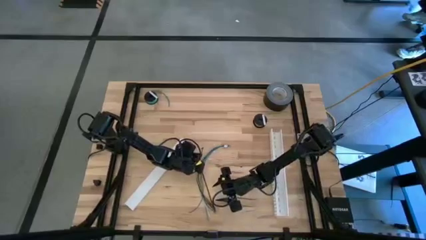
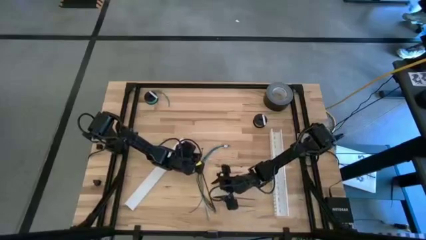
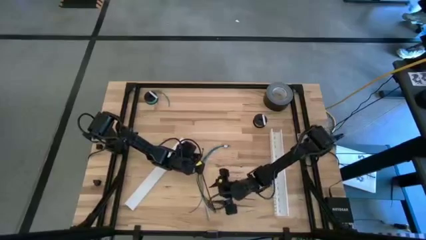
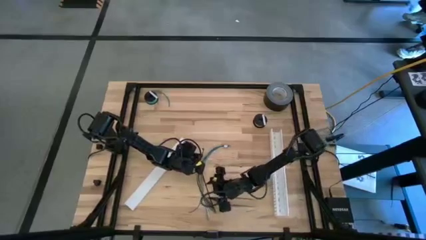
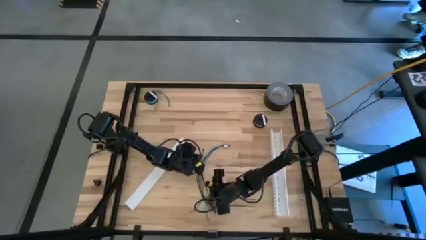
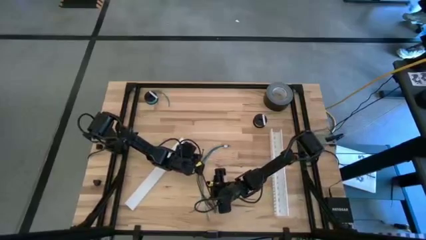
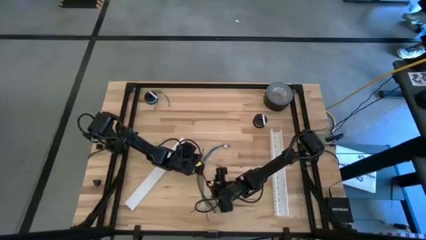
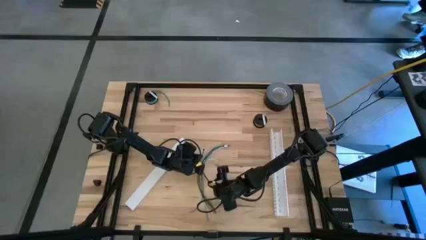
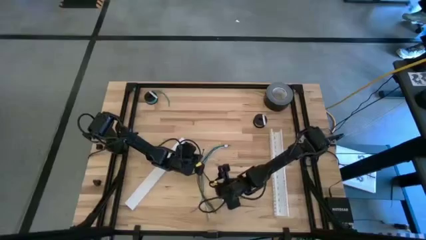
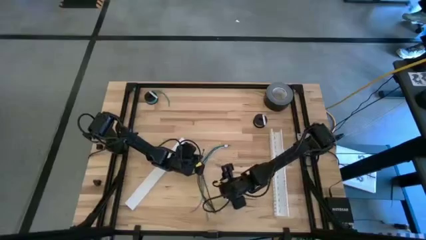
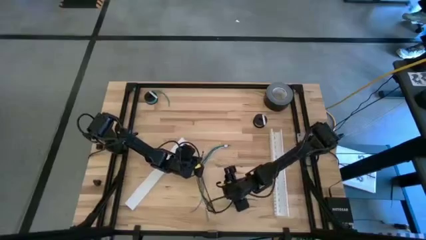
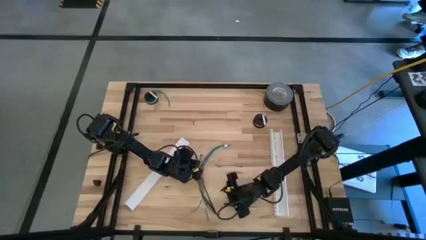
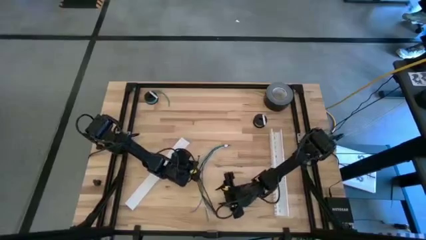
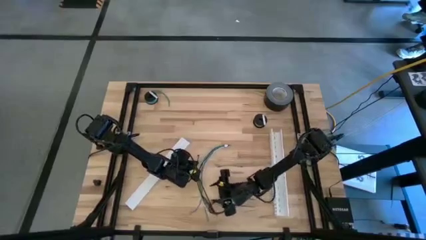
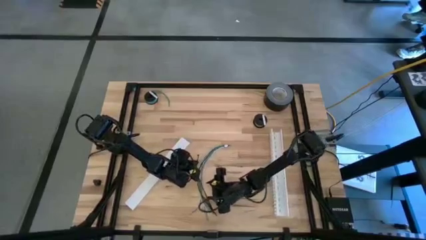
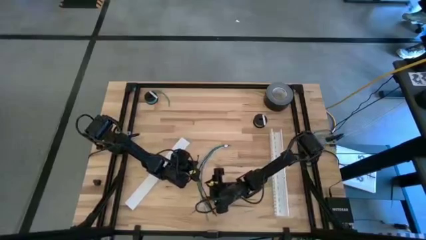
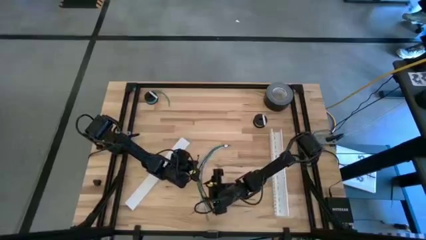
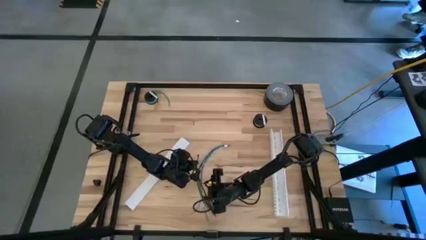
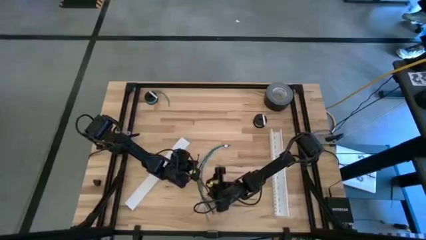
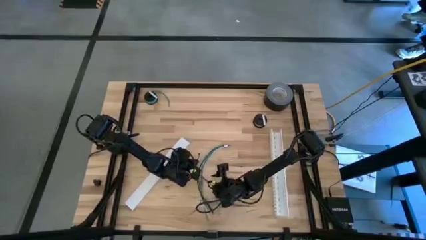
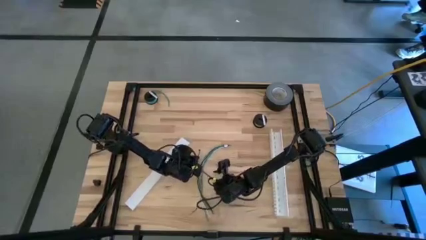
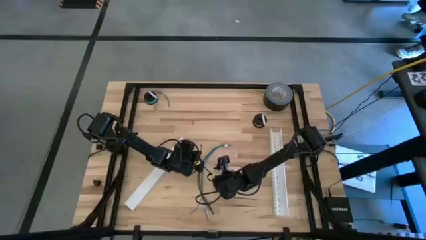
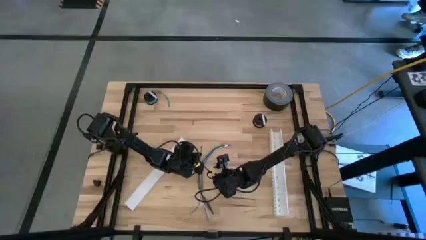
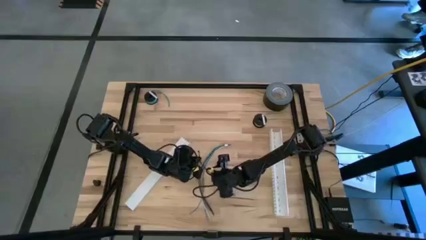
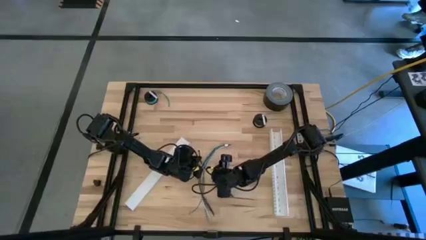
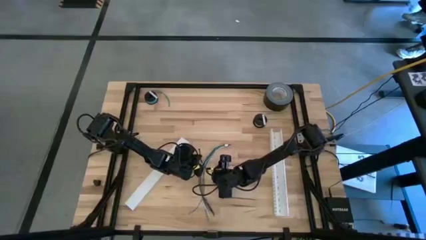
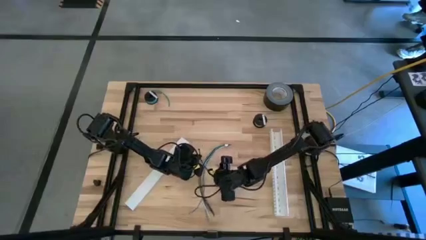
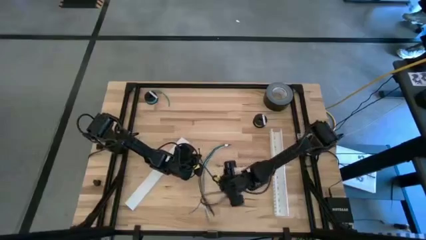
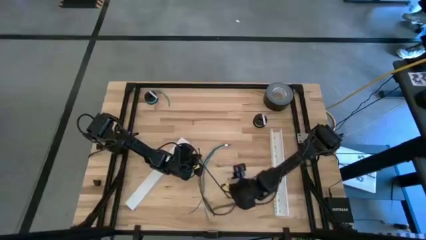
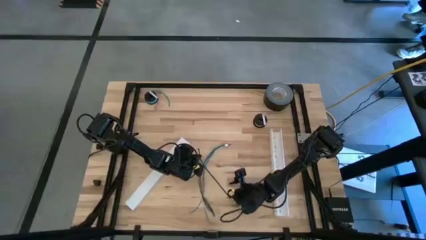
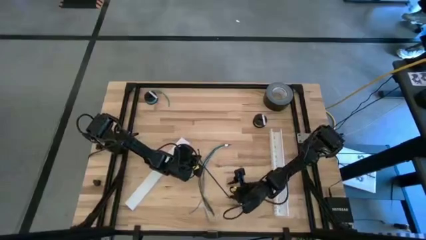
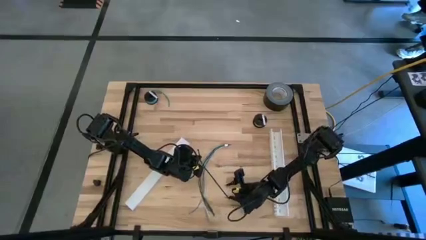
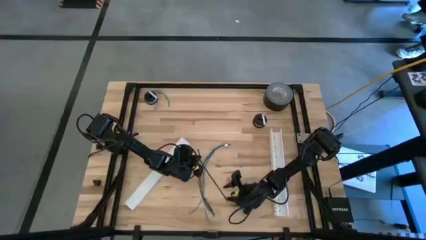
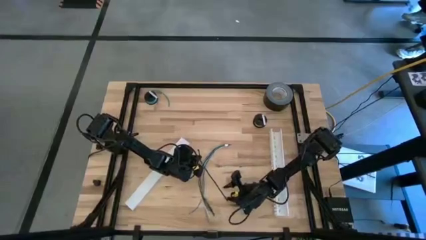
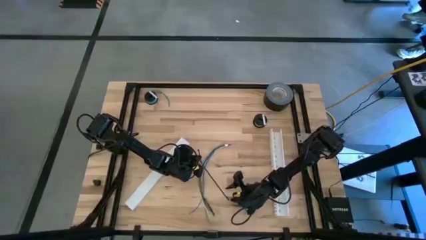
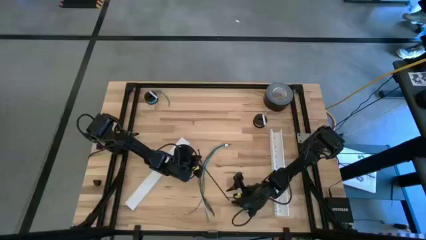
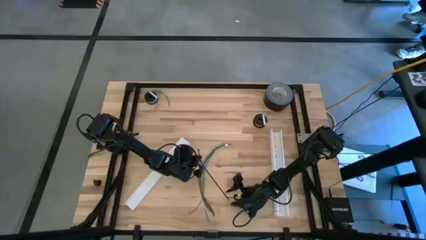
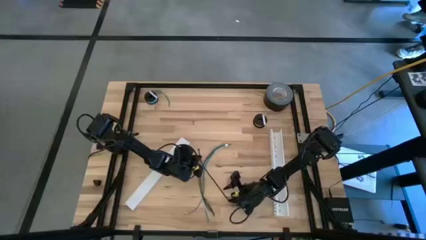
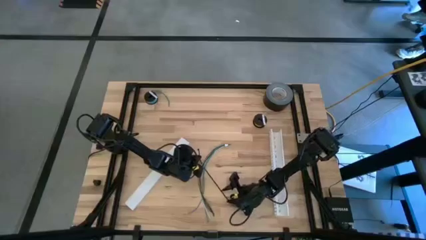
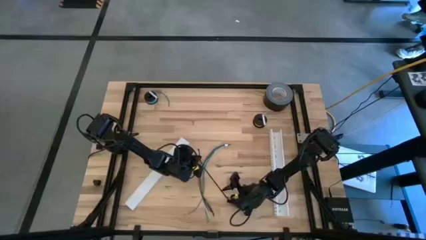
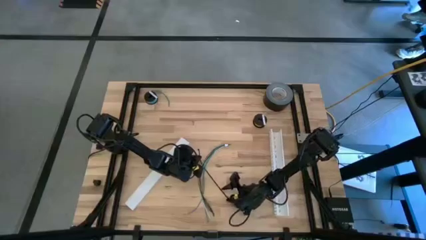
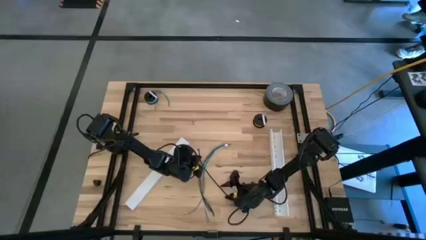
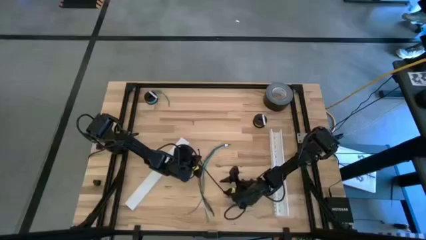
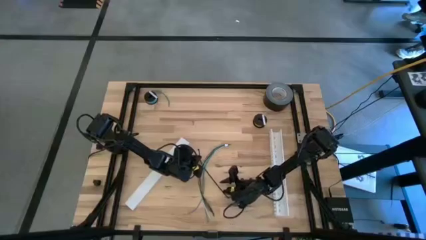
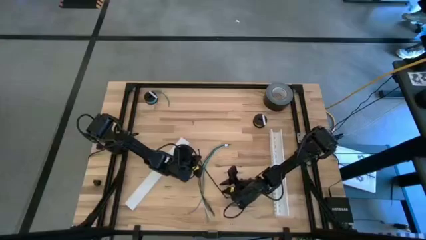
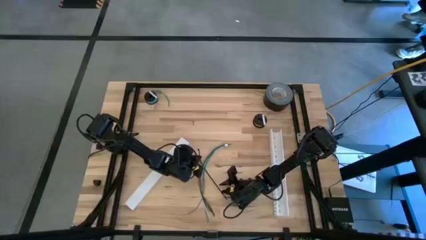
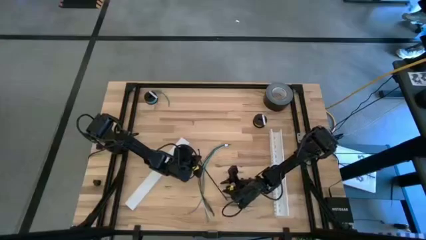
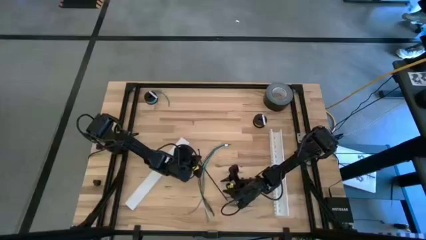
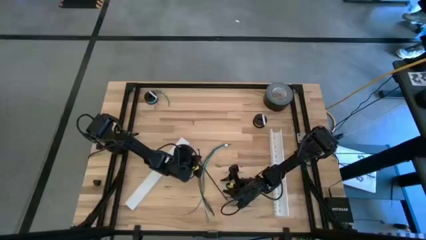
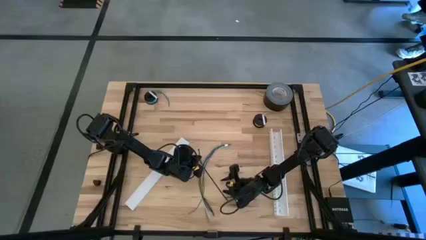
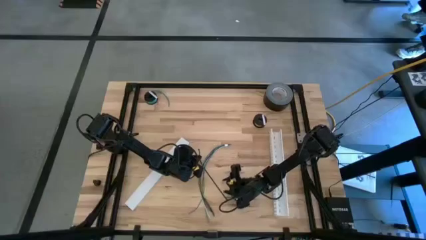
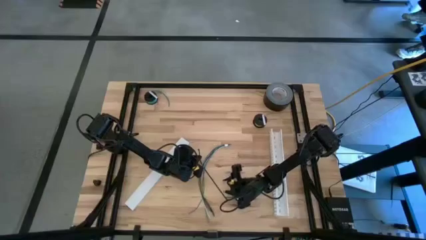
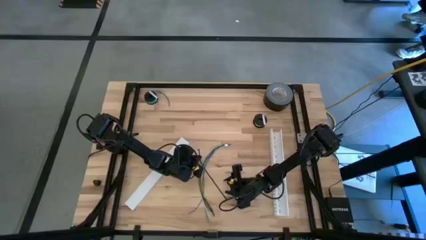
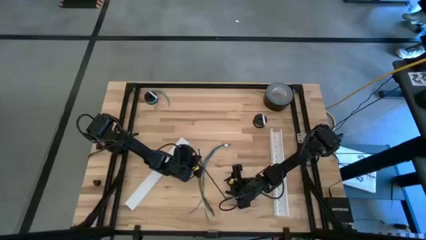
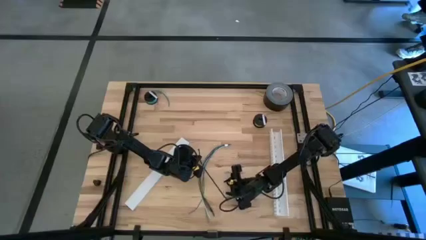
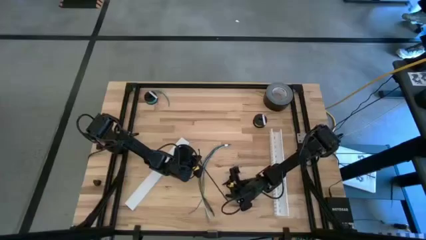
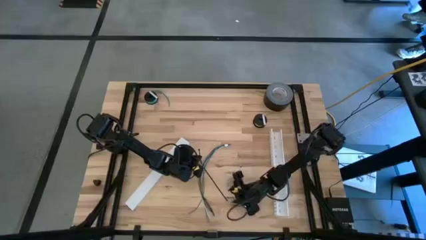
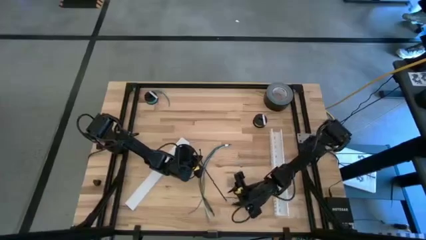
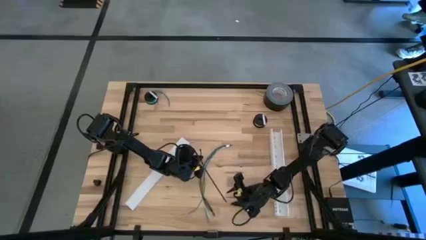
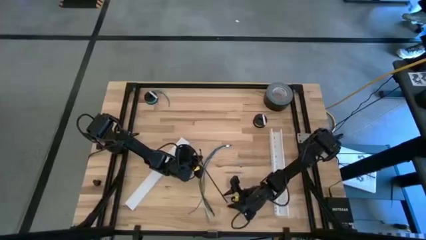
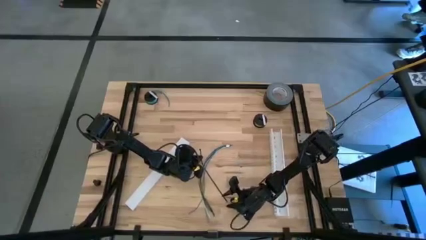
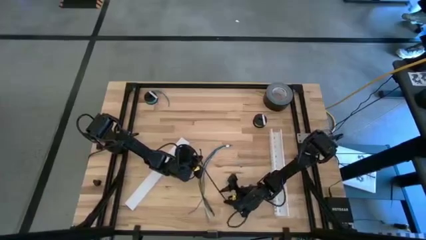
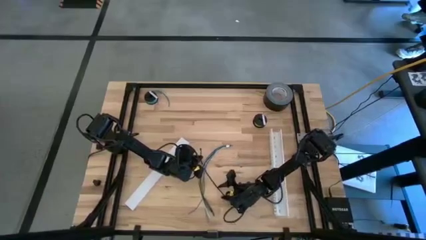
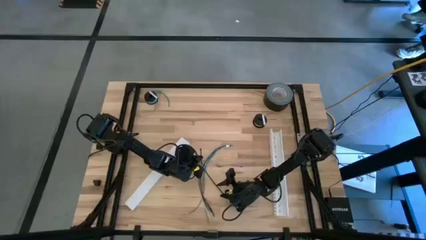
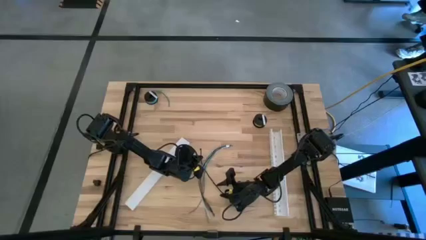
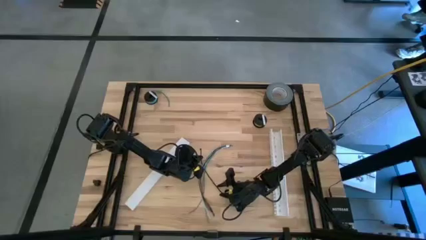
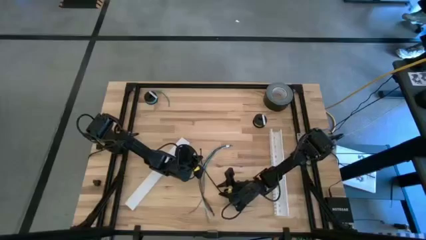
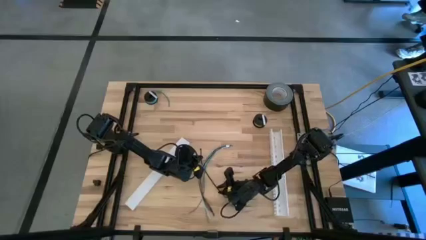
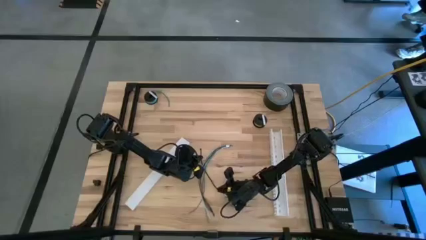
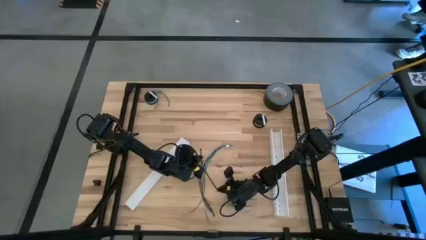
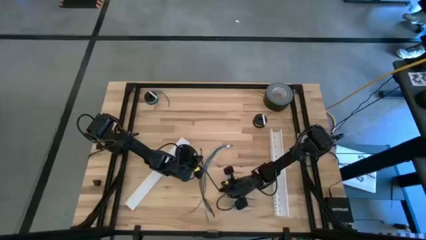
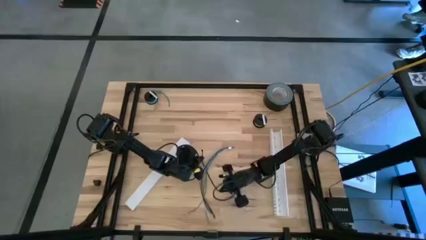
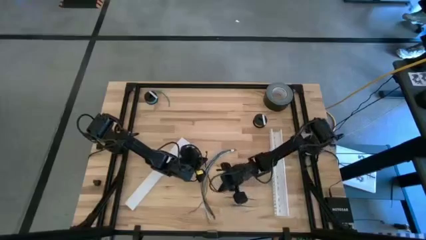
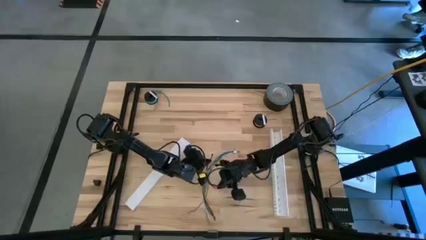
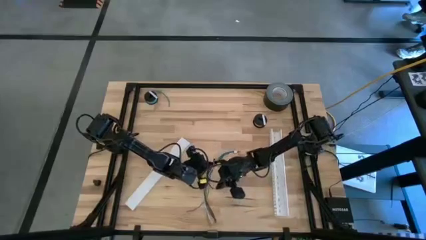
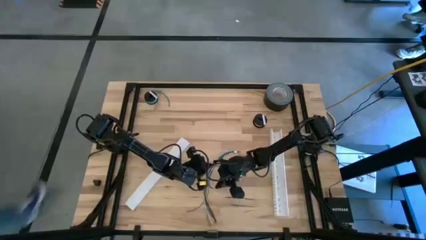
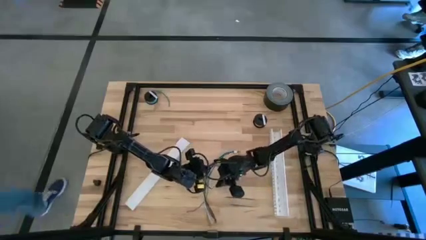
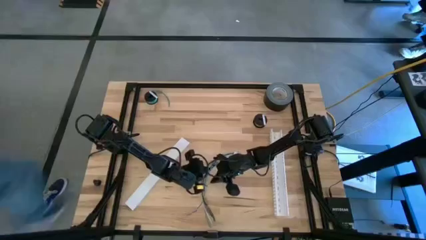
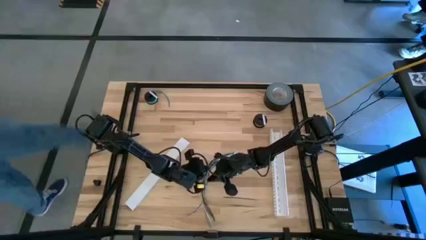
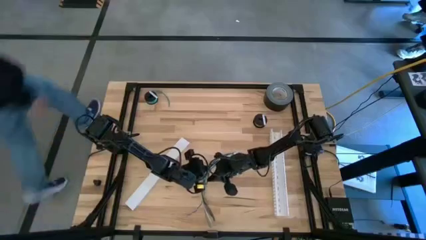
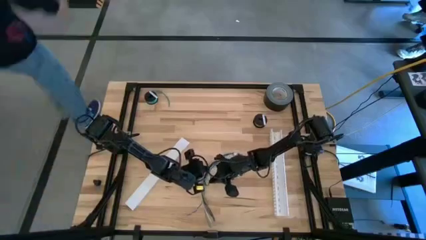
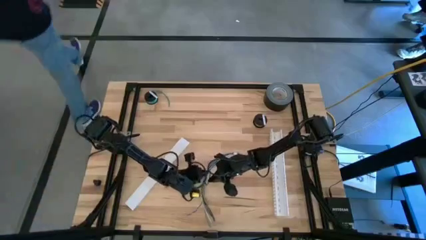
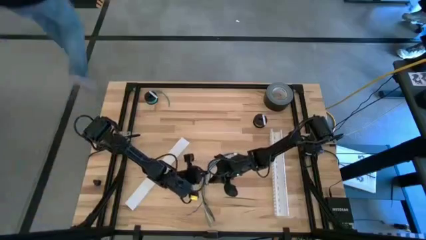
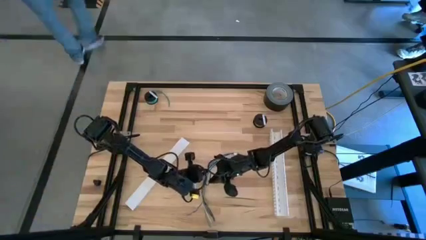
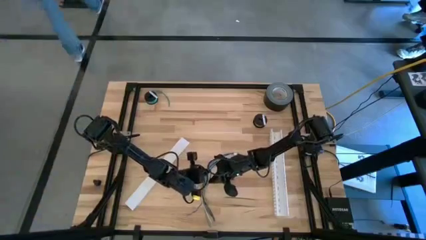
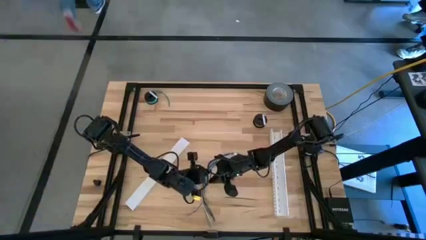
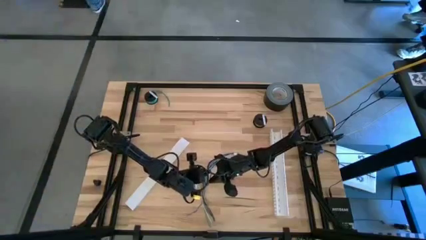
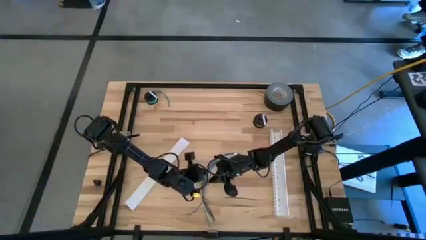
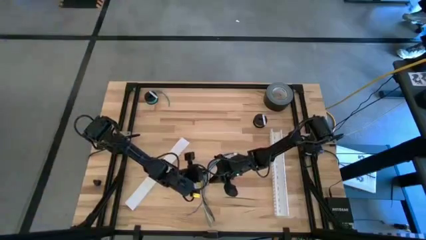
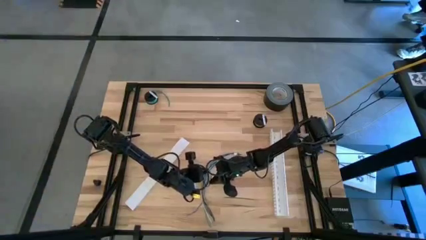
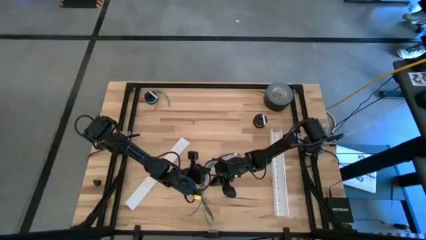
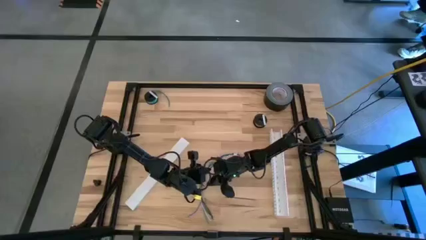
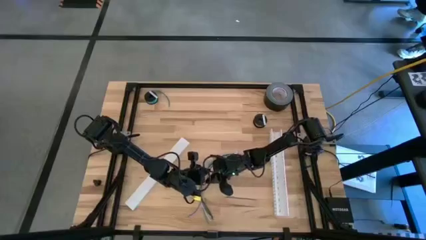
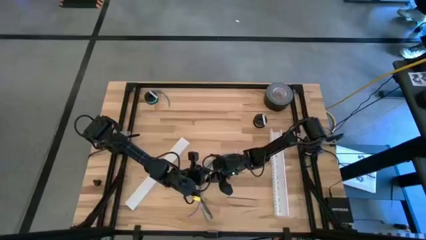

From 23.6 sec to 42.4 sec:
Task: Ziptie cables
Wrap the cable wires using the black zip tie
